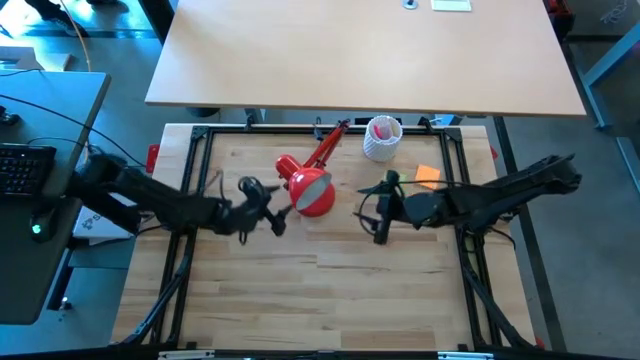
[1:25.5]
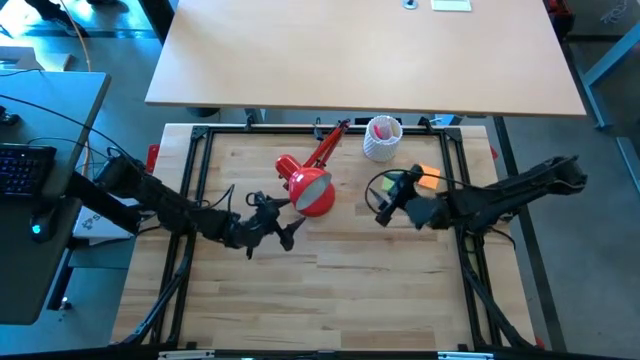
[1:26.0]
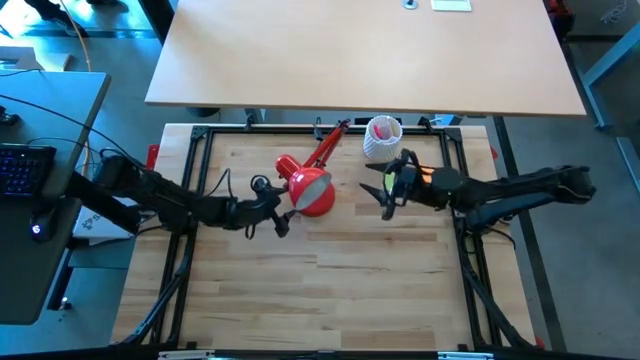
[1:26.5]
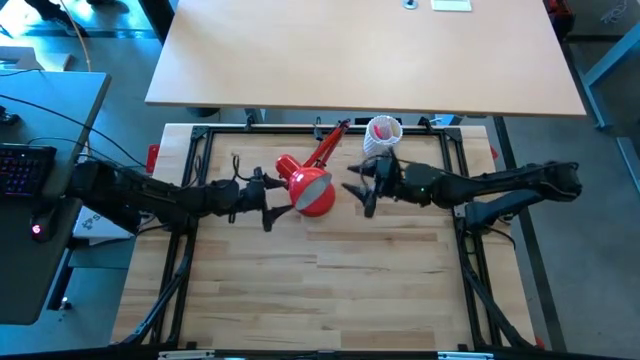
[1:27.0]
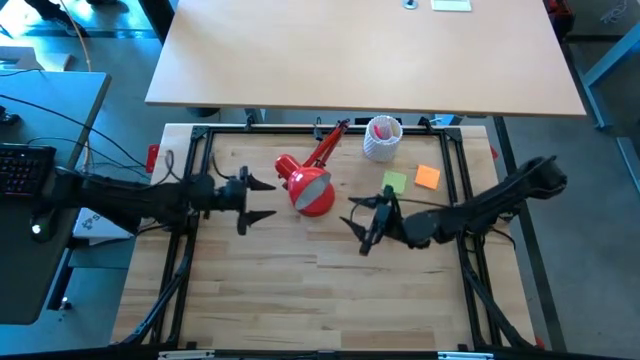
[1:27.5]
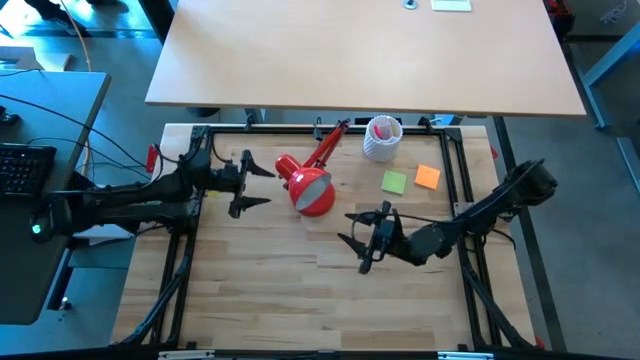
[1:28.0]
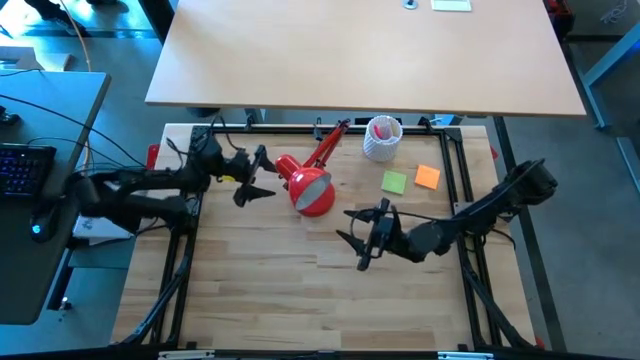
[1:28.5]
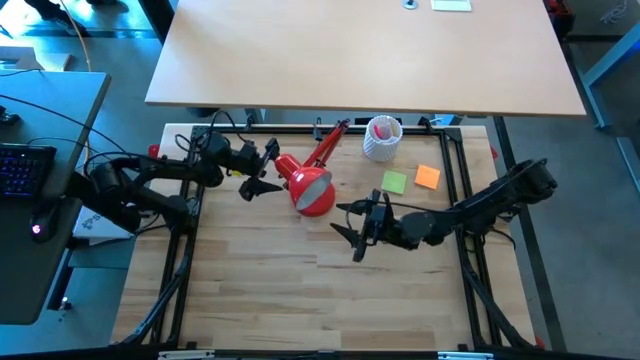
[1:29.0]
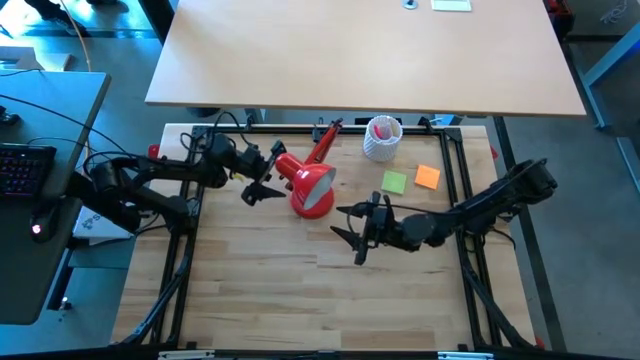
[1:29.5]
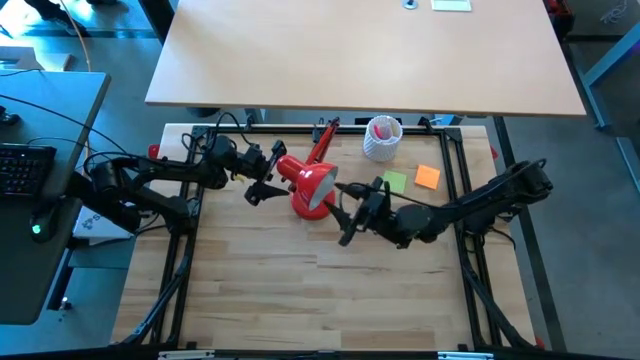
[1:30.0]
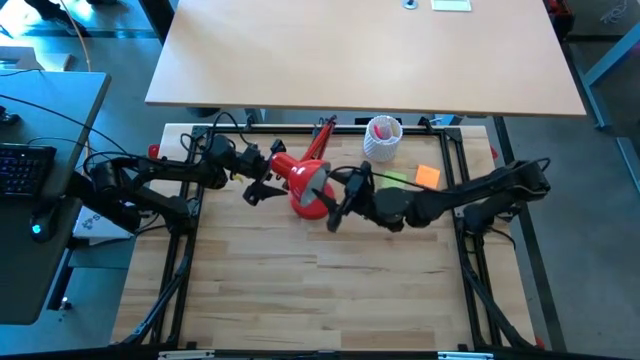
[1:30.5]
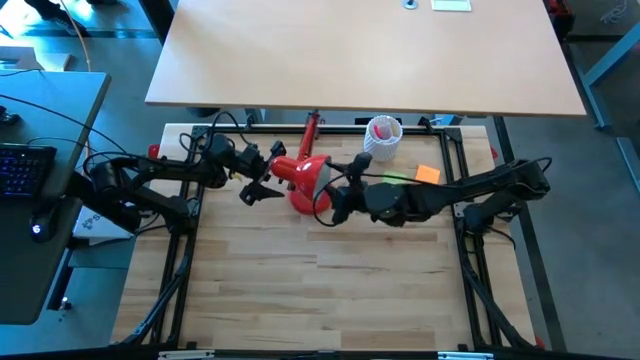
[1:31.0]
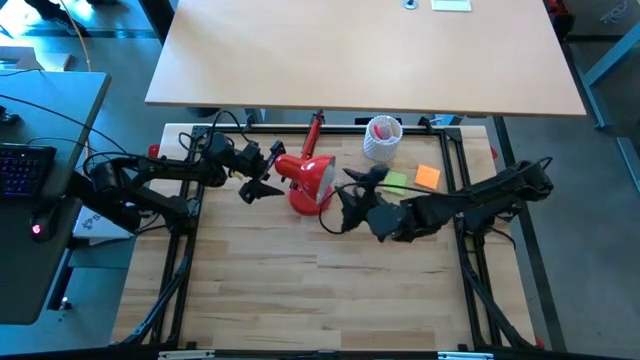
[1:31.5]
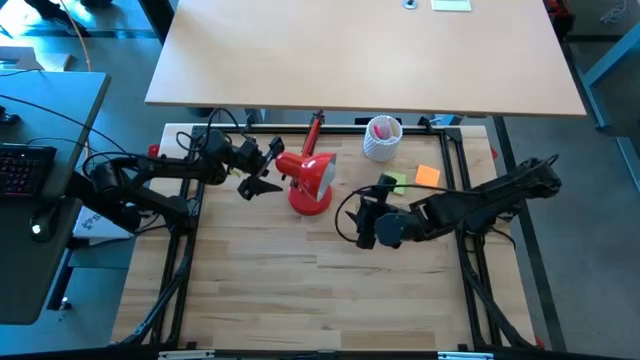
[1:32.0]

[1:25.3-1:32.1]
Task: Screw lightbulb
Remove the white lightbulb from the red lamp

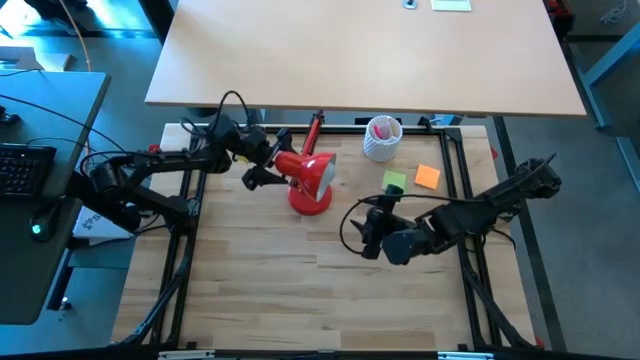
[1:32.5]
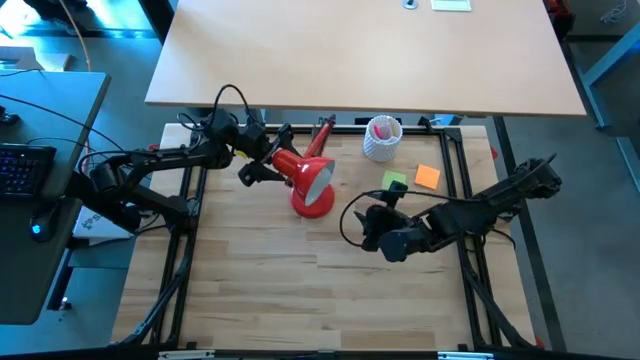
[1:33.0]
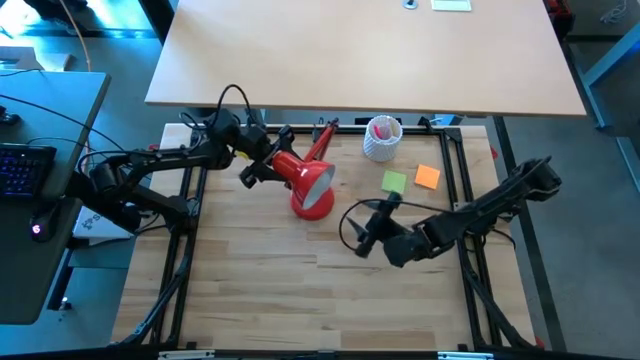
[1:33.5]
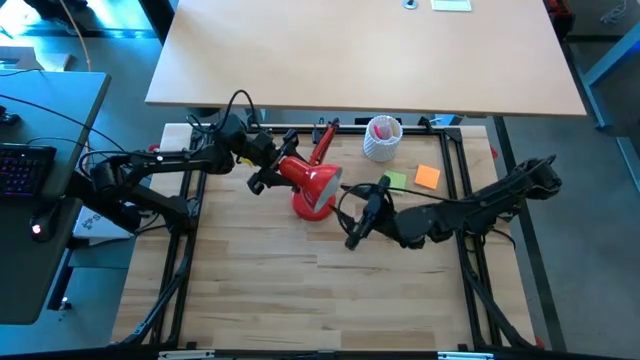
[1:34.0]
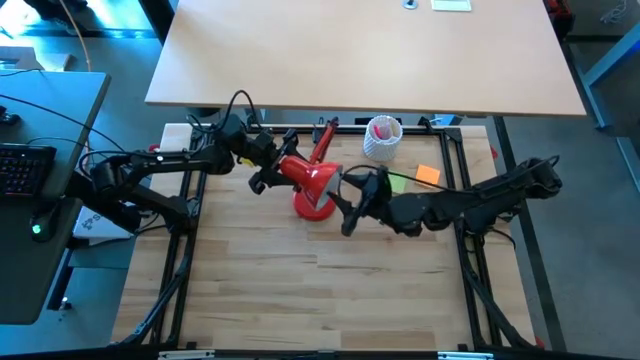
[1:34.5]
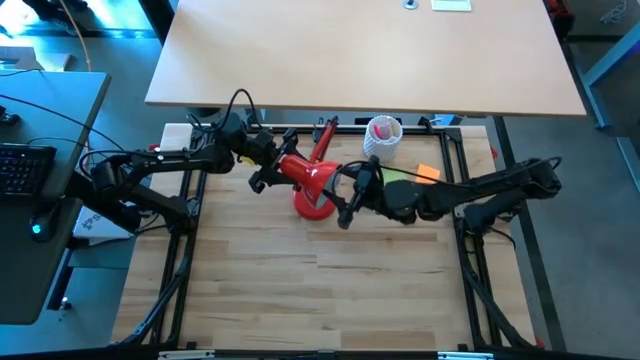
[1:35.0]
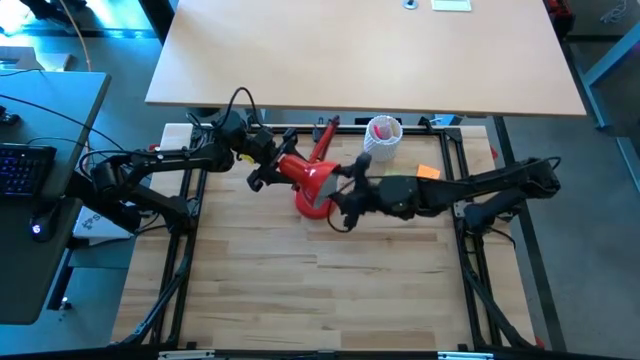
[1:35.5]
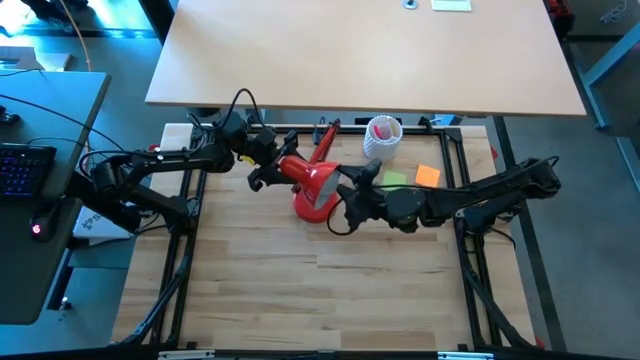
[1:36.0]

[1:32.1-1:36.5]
Remove the white lightbulb from the red lamp

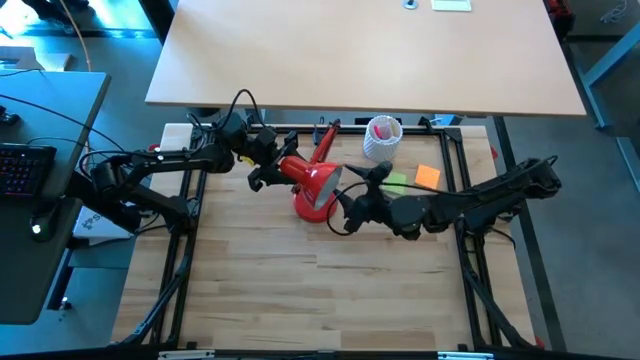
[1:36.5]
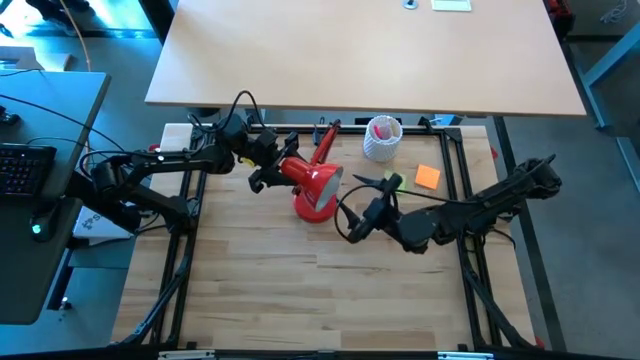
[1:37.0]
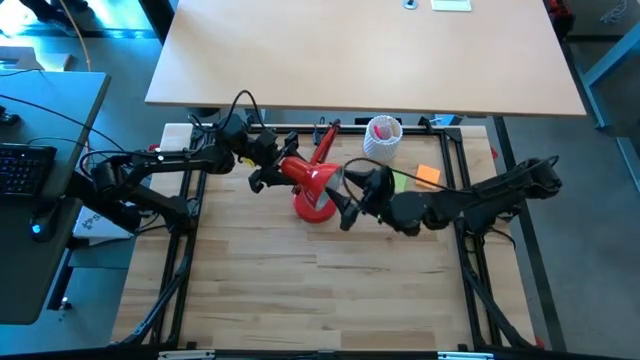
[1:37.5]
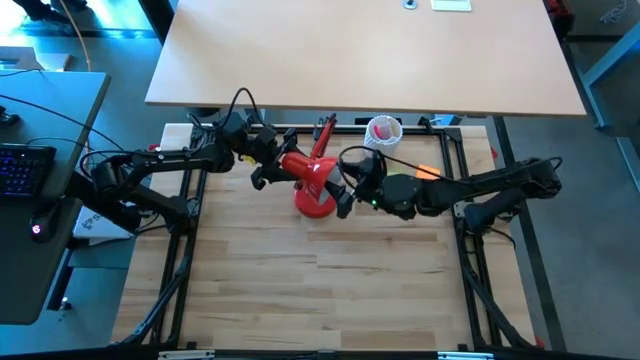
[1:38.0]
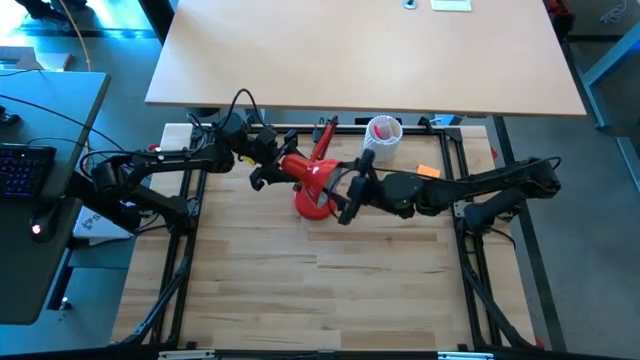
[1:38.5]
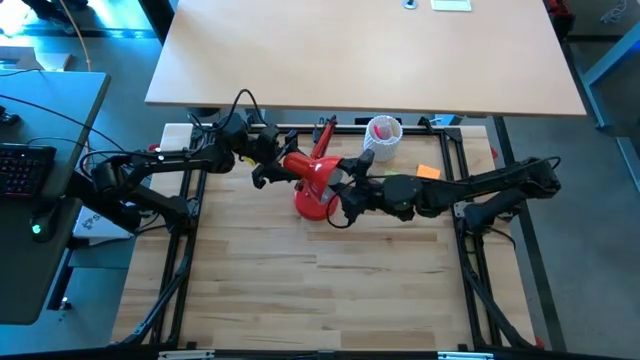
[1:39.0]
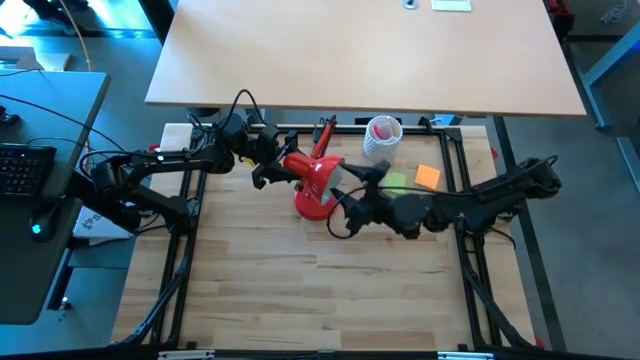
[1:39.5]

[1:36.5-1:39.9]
Remove the white lightbulb from the red lamp

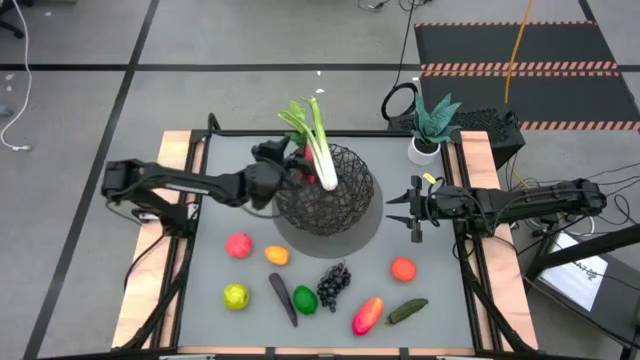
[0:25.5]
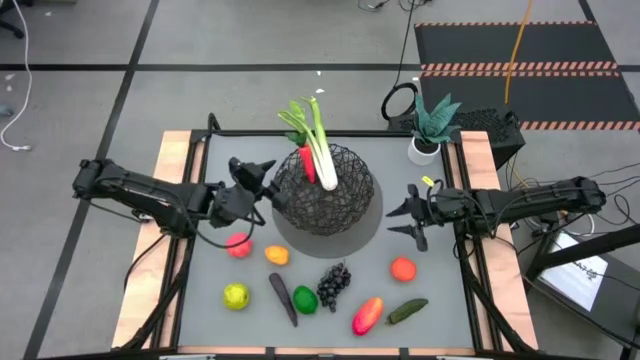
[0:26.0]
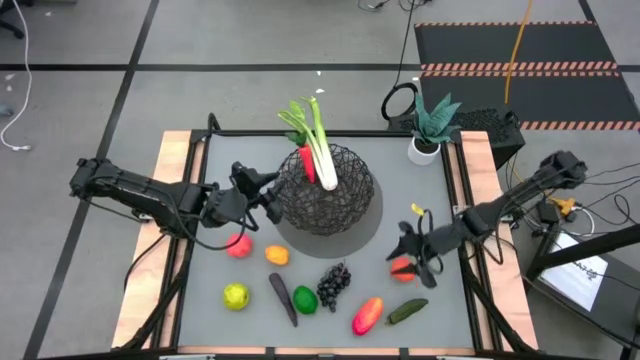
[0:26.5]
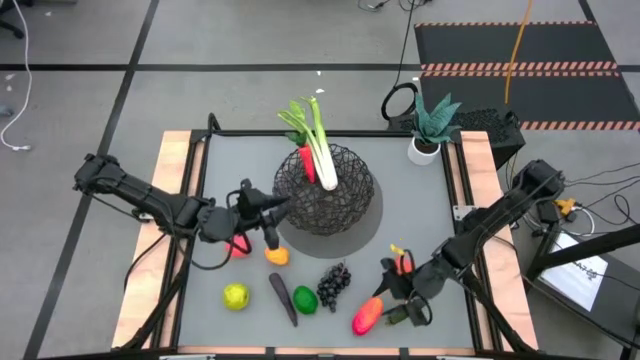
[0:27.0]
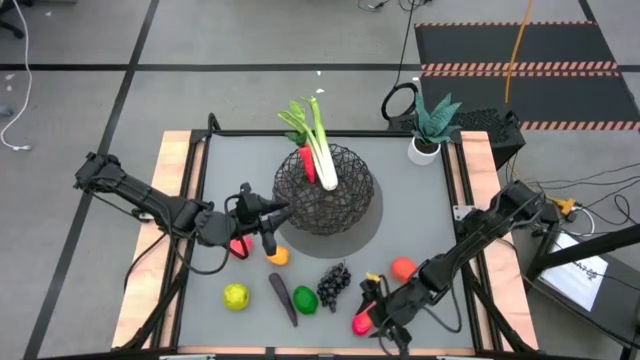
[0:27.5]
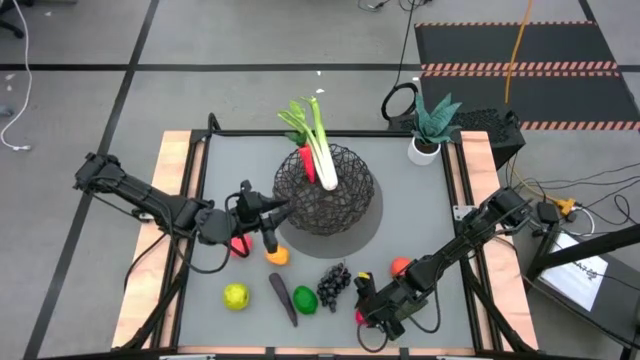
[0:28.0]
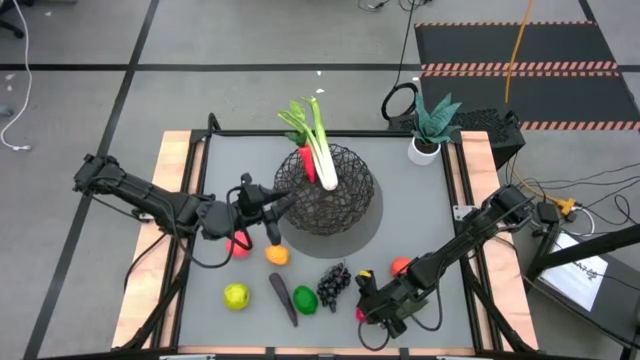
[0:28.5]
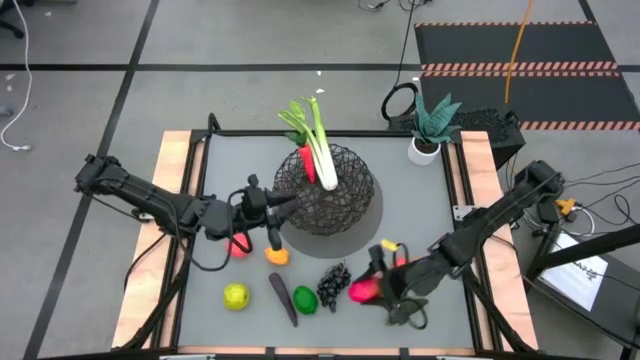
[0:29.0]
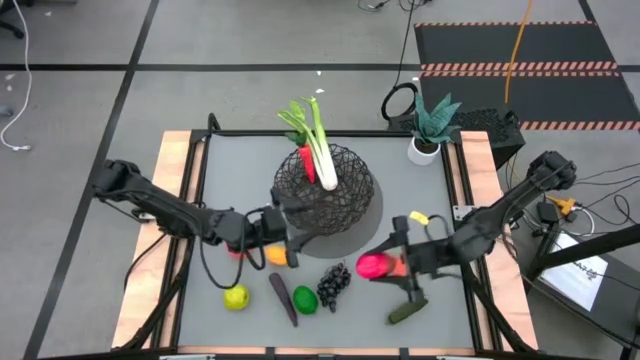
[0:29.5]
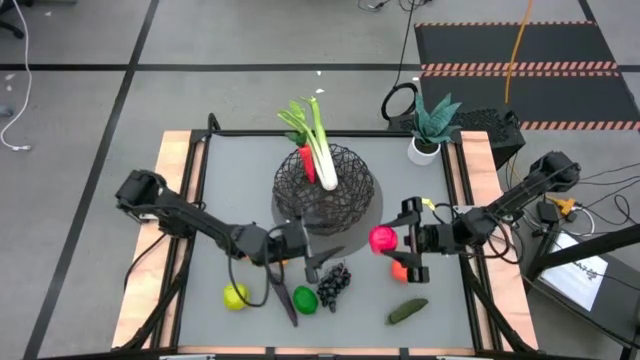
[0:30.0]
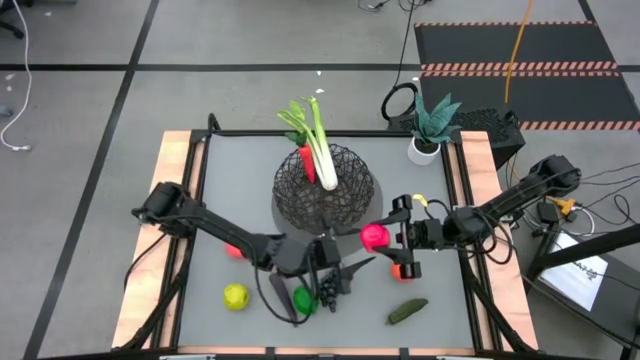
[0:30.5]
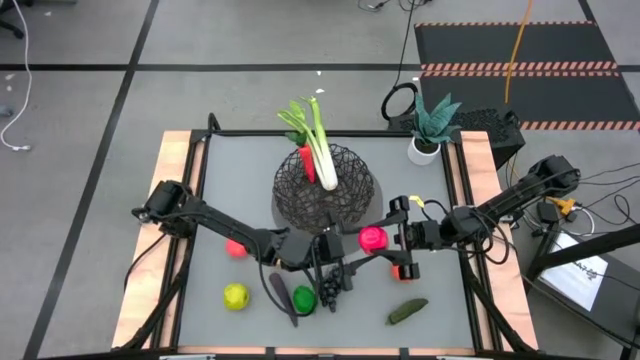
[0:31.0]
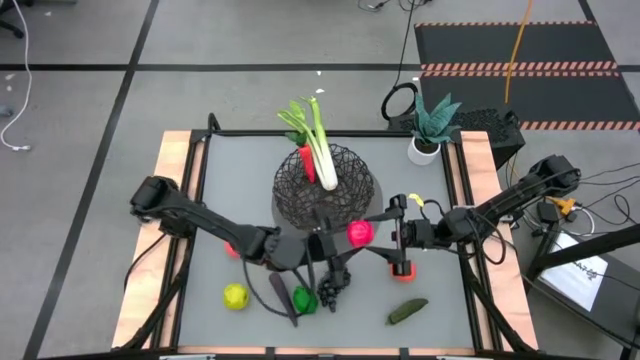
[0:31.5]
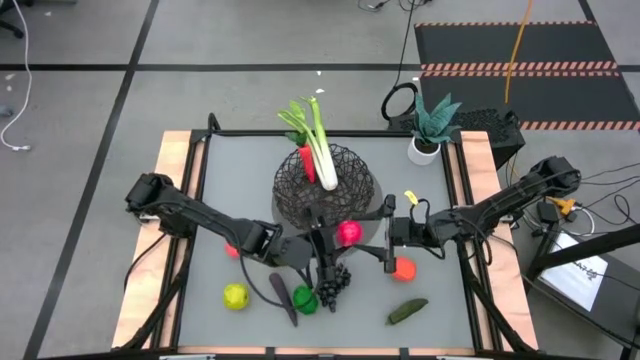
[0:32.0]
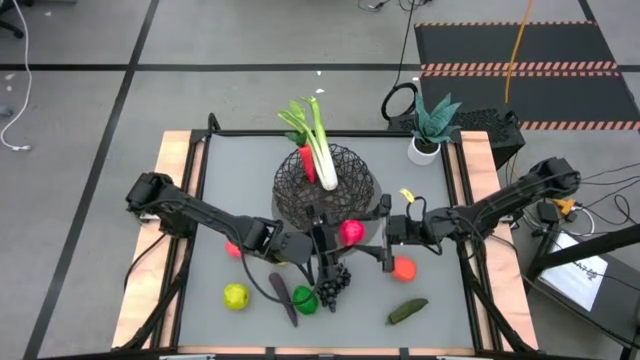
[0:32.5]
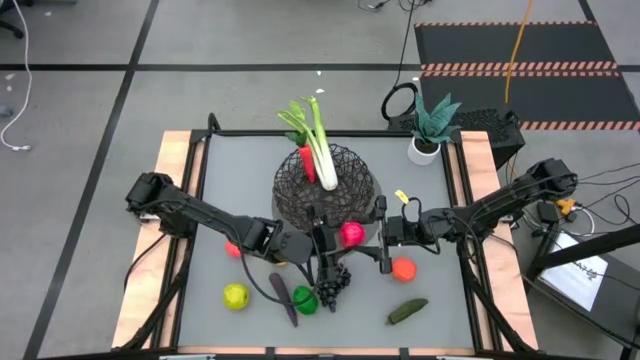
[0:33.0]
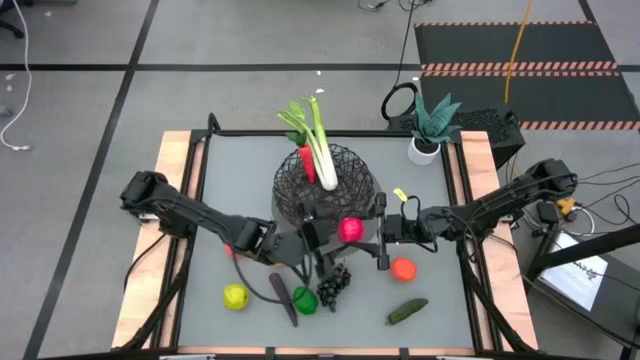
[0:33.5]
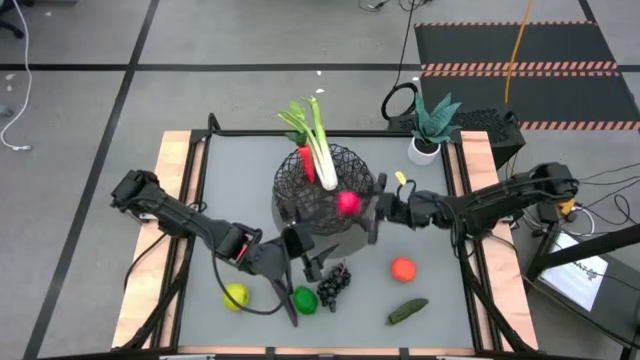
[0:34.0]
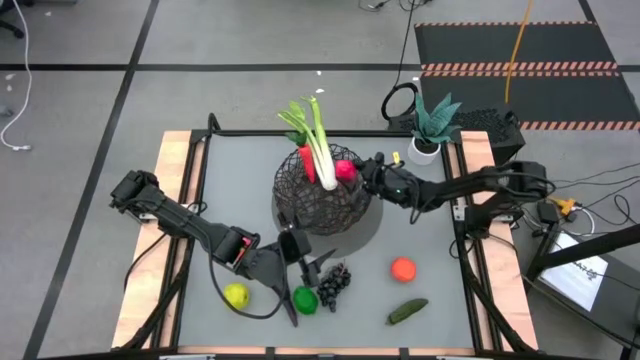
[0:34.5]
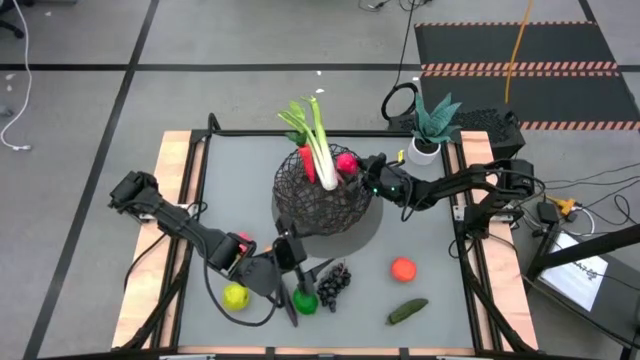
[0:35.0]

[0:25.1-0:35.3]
Task: Build produce basket
Put the red mango into the black woven basket
